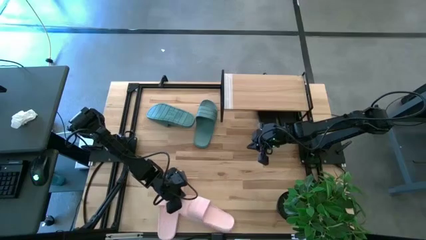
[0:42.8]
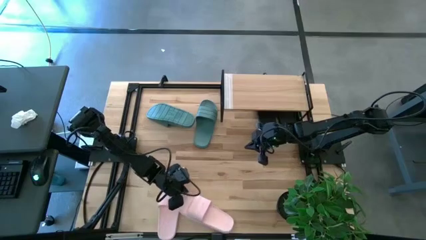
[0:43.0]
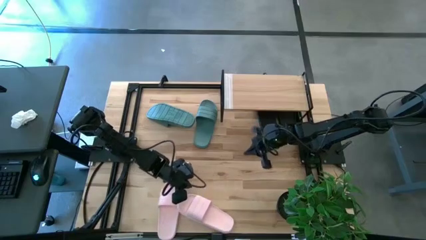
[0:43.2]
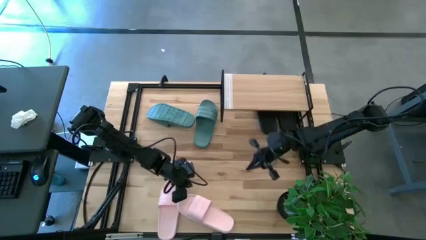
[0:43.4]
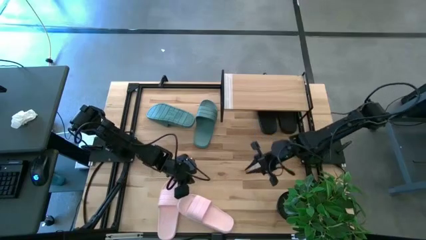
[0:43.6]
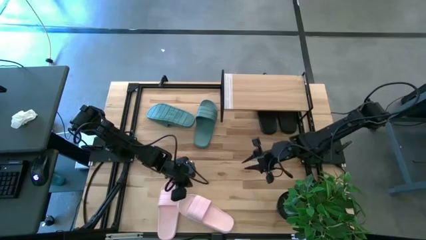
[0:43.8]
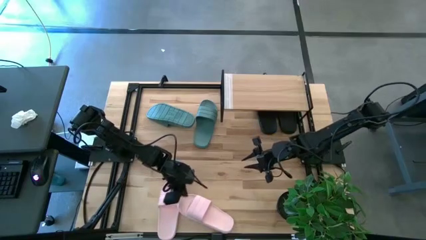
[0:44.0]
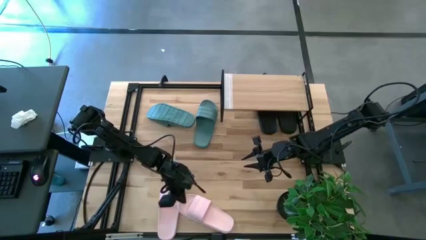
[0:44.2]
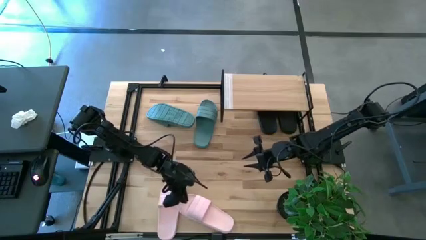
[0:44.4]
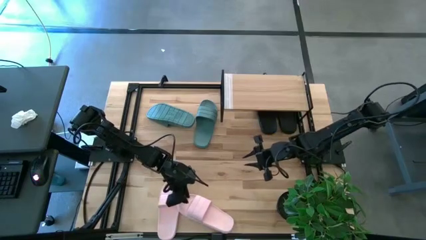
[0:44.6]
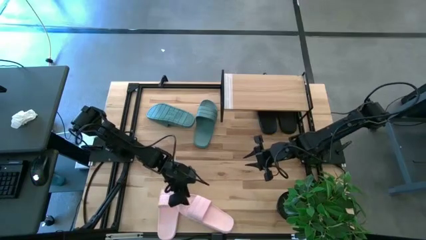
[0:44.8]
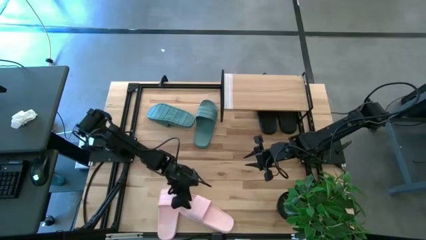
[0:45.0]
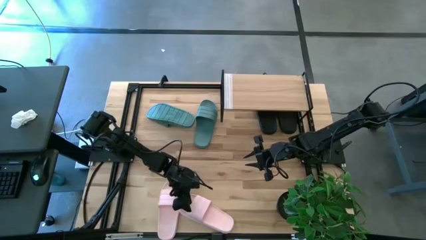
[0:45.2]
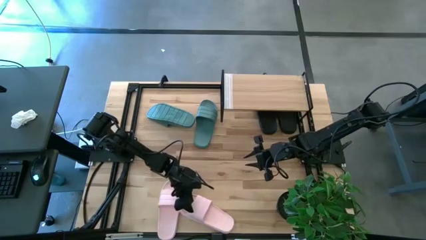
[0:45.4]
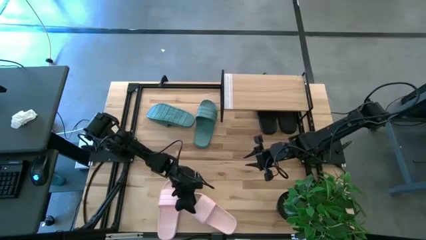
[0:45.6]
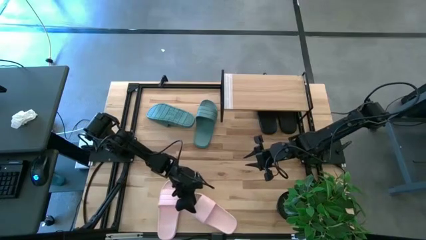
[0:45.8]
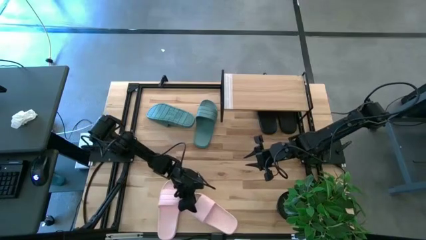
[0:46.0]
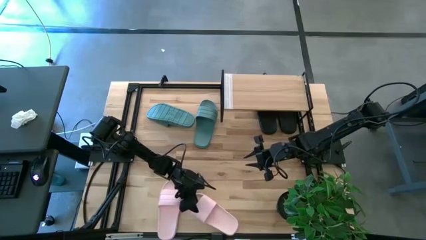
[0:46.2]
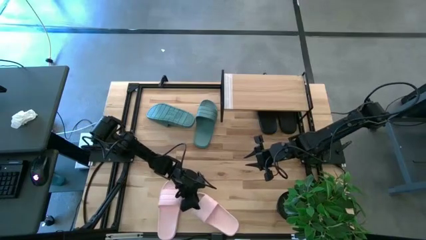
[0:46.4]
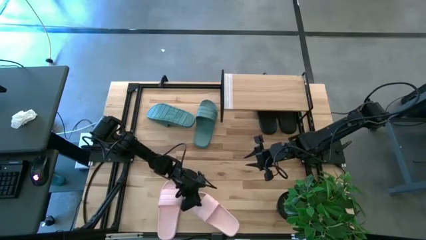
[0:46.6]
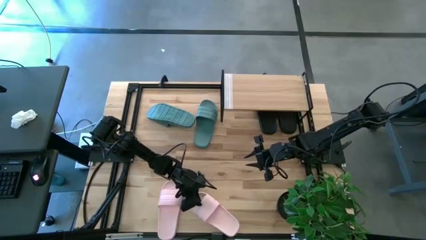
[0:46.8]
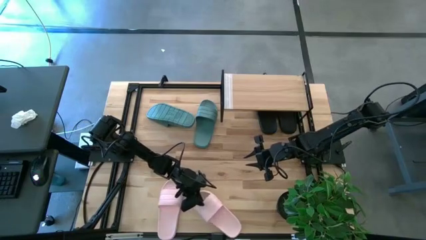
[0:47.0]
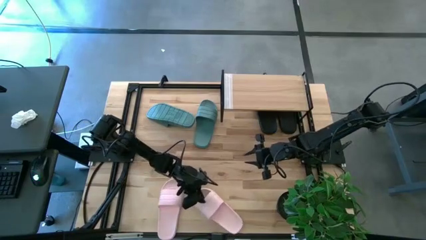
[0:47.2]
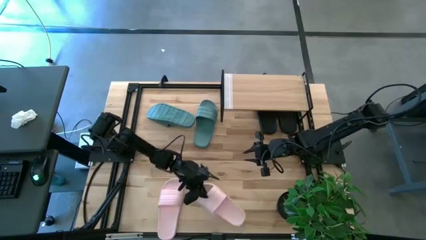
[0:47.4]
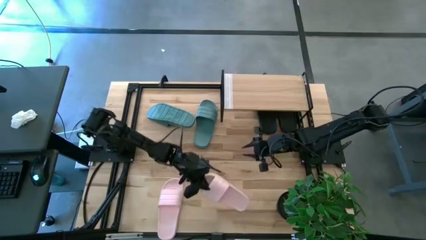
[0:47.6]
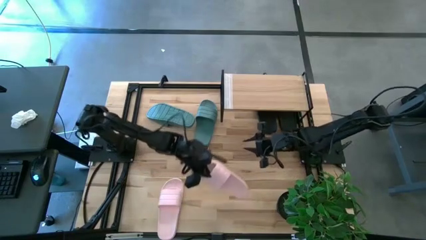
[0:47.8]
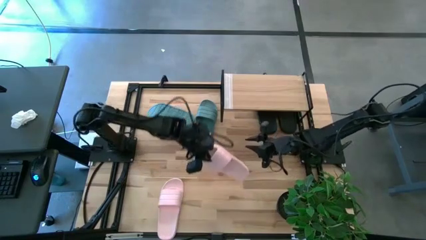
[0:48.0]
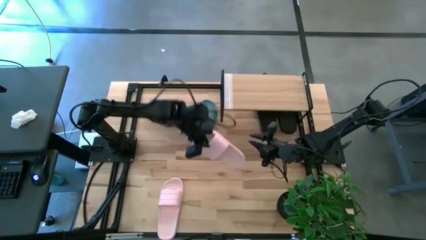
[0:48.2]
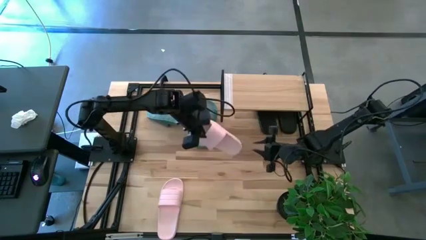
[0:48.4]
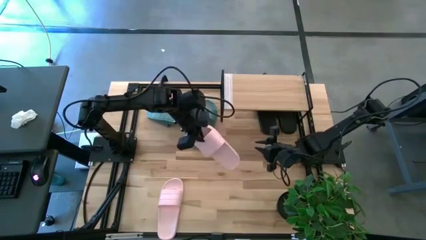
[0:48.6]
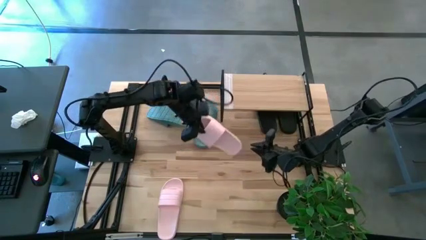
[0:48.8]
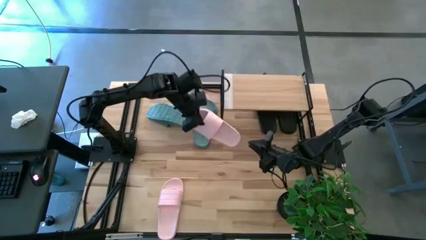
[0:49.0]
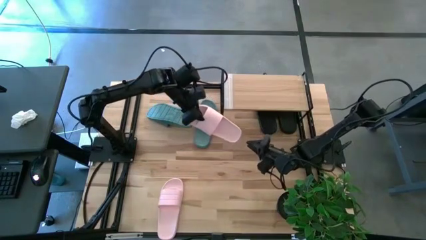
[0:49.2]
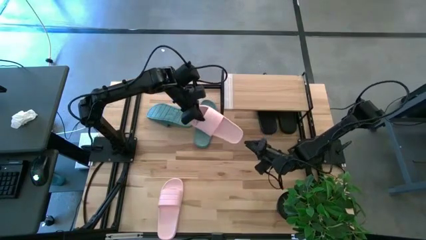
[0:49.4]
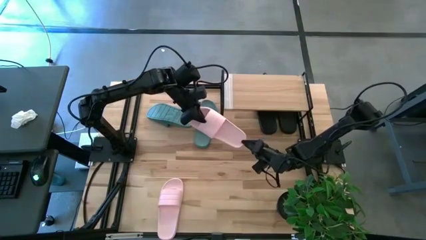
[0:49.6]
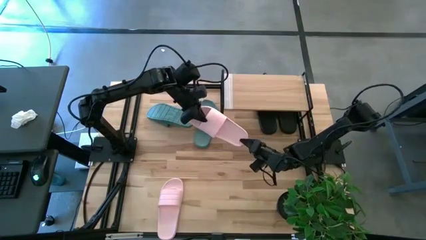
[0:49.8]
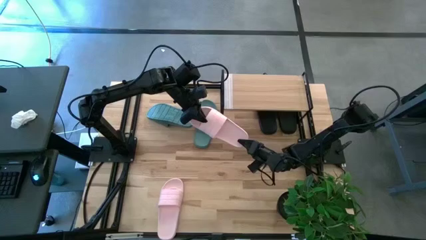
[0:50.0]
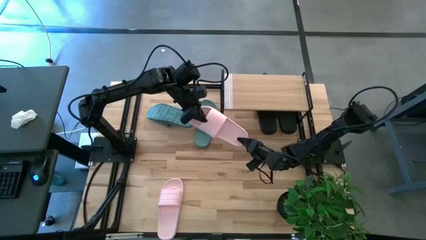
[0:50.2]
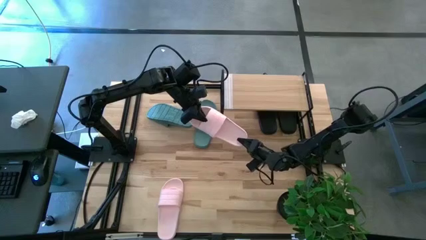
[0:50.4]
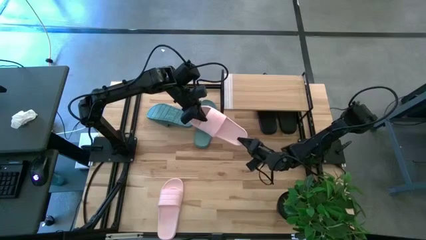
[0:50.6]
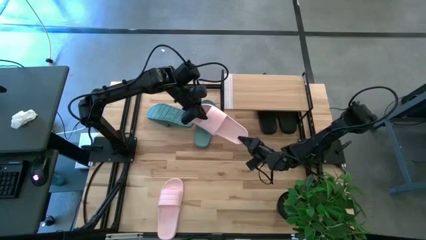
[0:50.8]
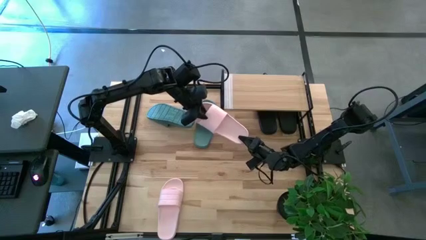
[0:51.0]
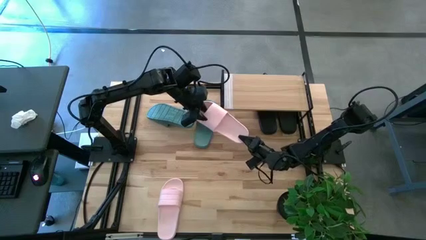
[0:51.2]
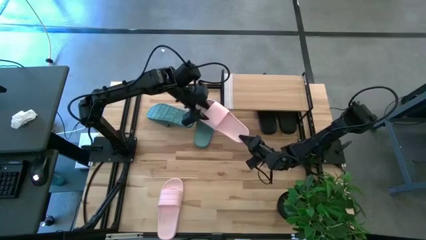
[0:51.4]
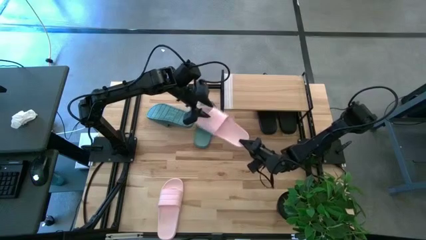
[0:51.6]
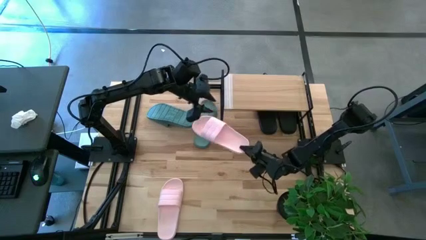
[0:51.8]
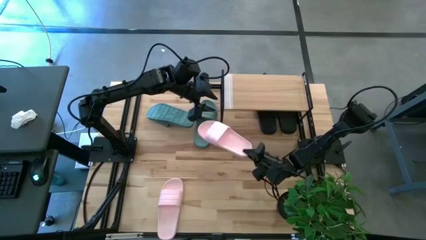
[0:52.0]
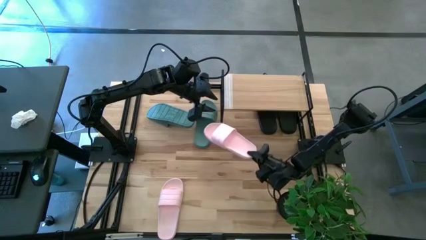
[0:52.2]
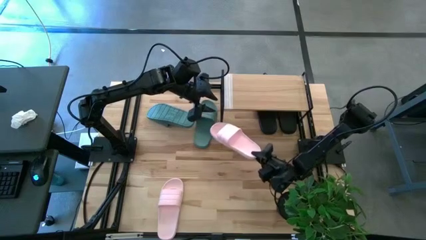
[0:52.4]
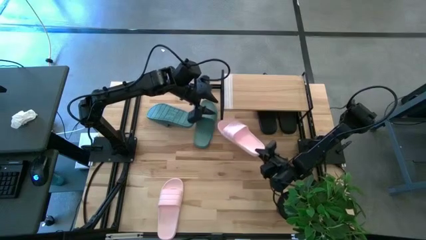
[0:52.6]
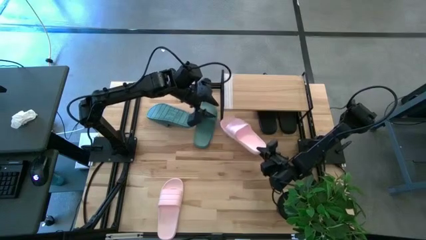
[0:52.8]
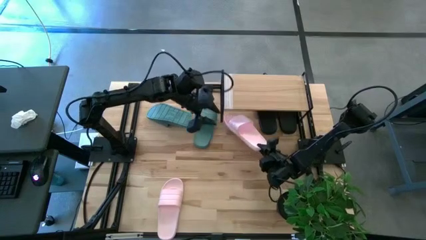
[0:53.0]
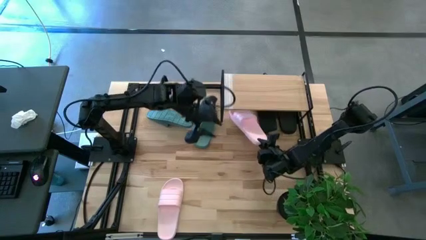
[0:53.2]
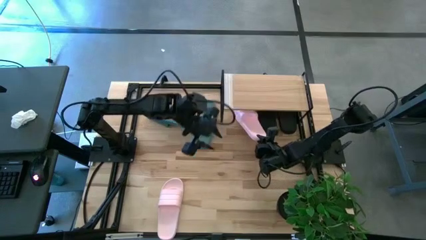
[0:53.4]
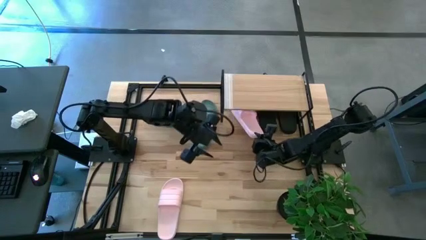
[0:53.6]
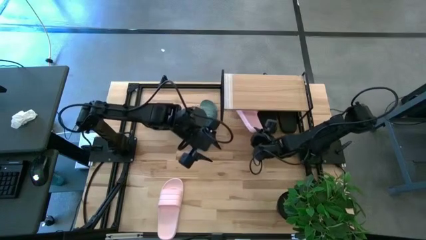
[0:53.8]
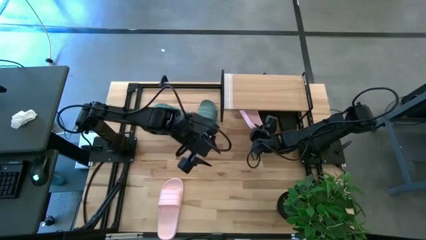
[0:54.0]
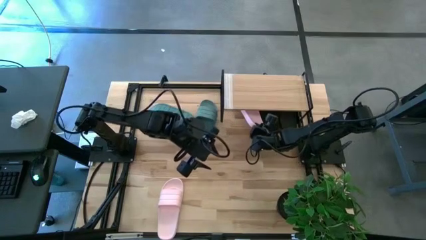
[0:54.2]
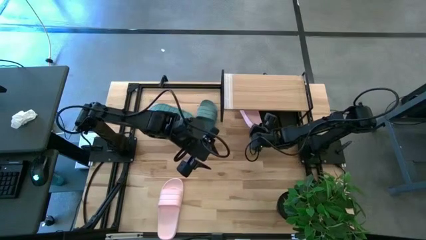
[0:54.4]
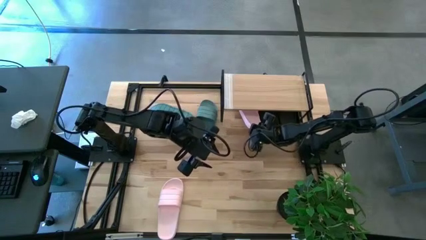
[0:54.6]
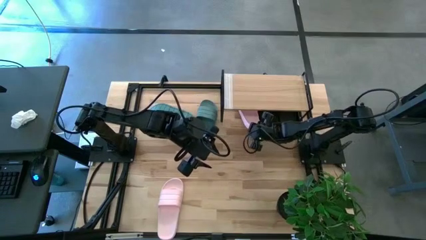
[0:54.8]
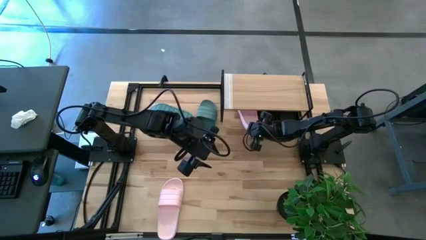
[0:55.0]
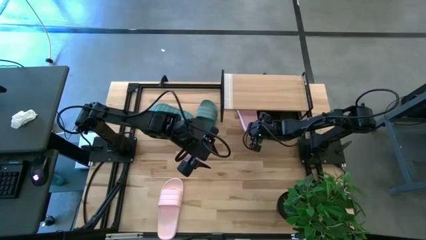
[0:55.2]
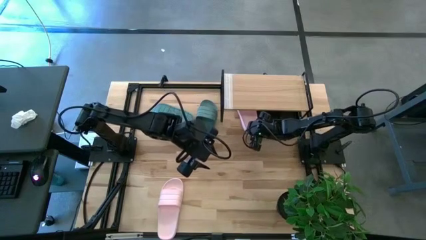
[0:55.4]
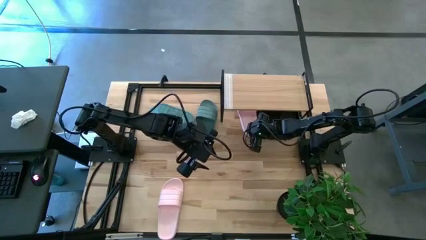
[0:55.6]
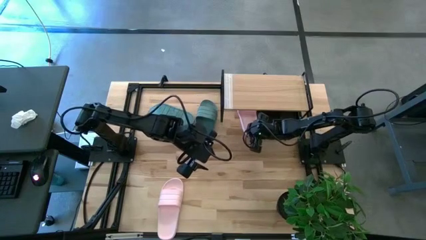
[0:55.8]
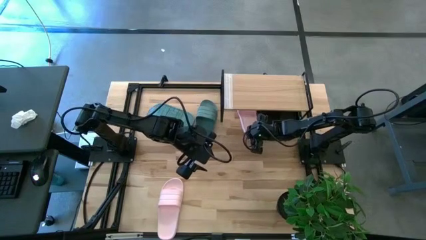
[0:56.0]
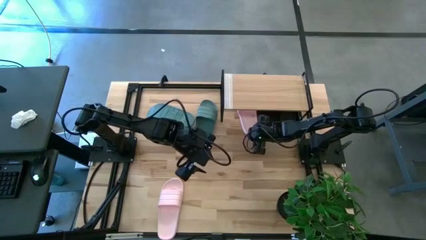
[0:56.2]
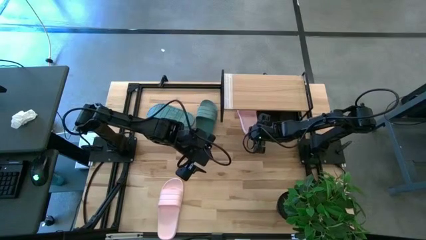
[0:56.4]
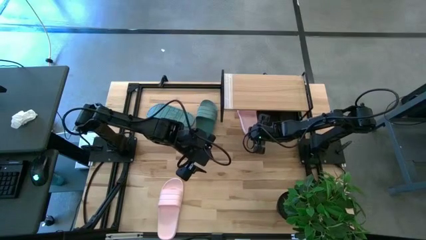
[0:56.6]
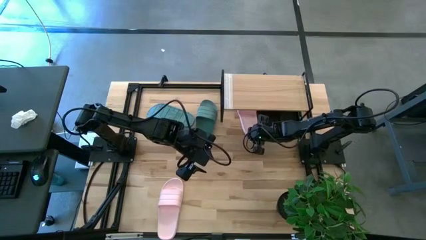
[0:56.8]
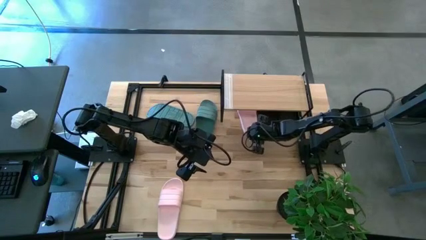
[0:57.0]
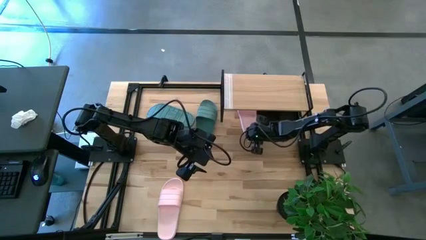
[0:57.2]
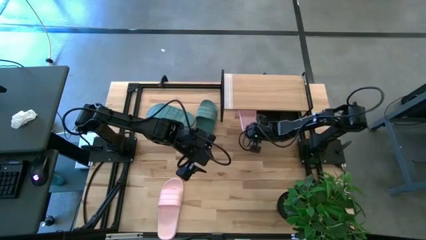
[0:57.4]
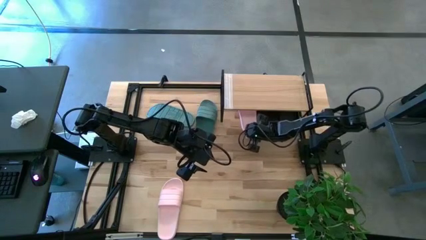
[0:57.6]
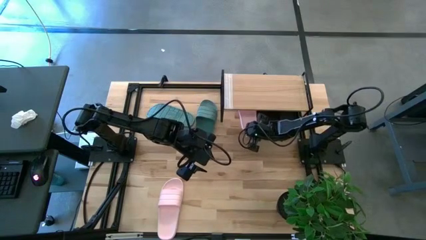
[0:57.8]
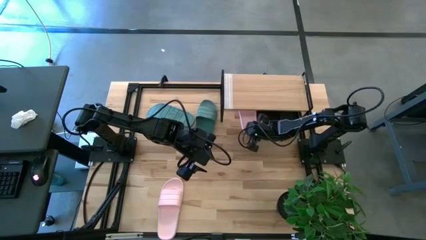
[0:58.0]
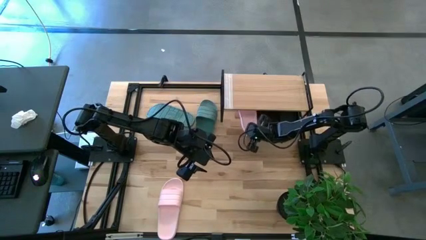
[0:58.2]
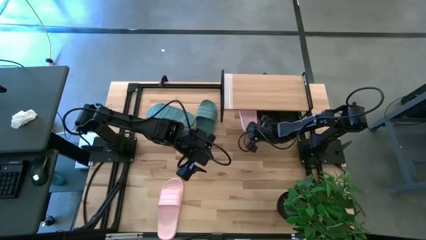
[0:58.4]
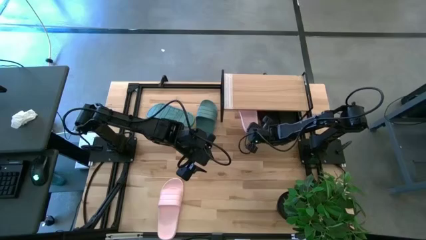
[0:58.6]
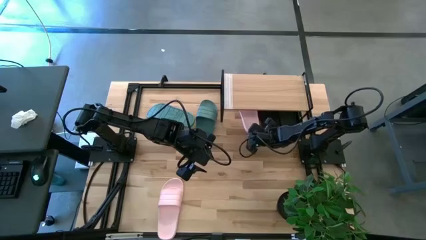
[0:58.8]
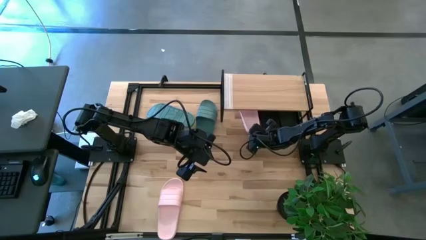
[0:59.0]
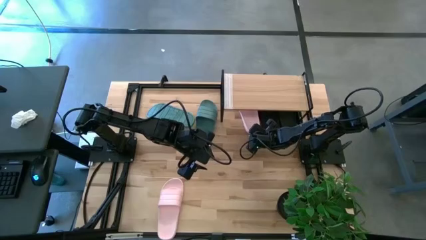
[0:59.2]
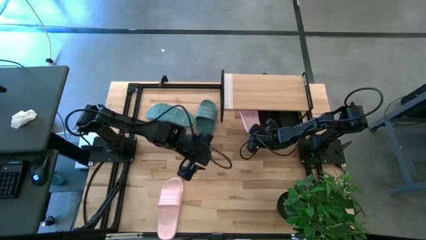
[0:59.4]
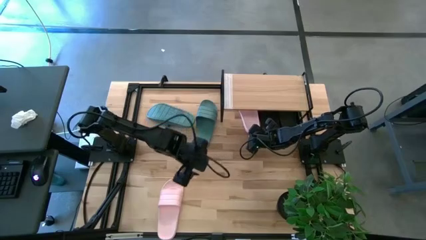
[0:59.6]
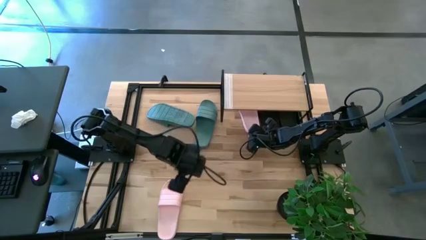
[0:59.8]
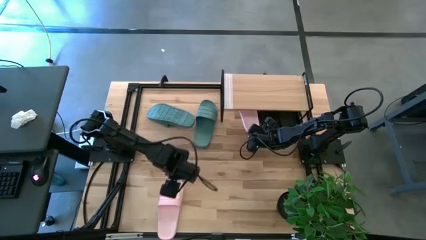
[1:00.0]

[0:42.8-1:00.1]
Task: Pick and place slides into the shelf
Put the right pink slipper under the shelf
